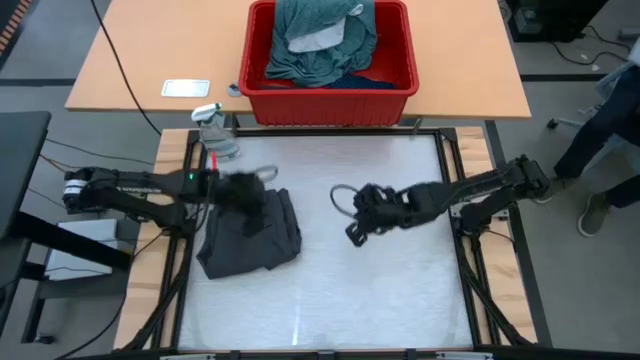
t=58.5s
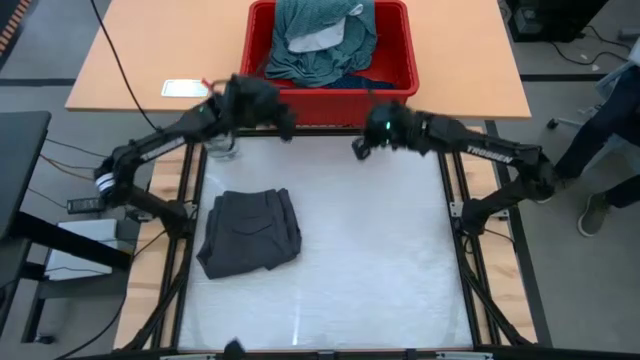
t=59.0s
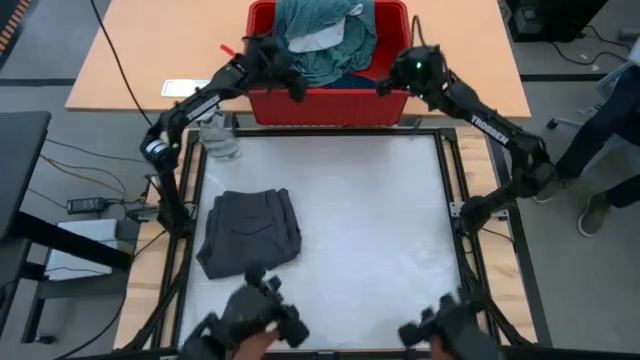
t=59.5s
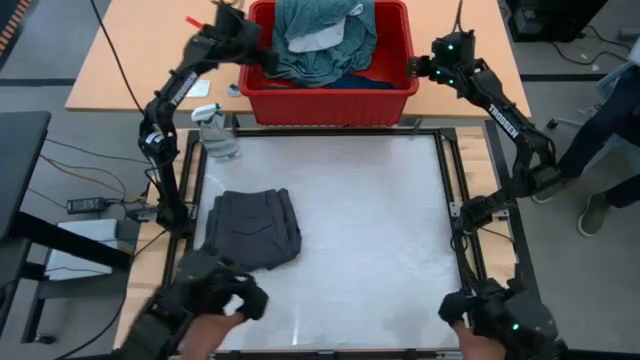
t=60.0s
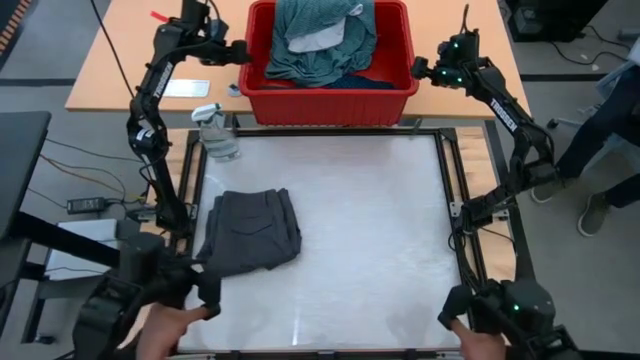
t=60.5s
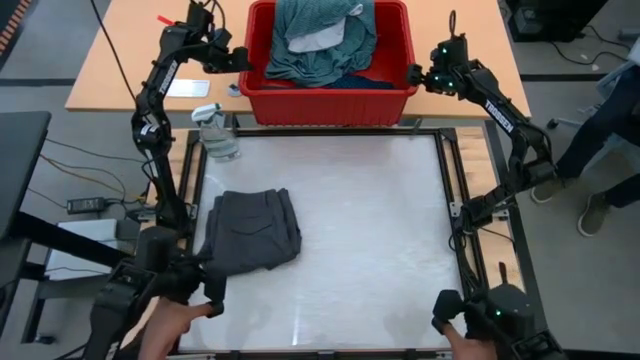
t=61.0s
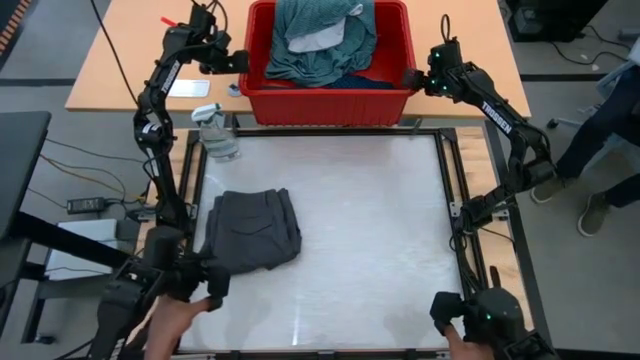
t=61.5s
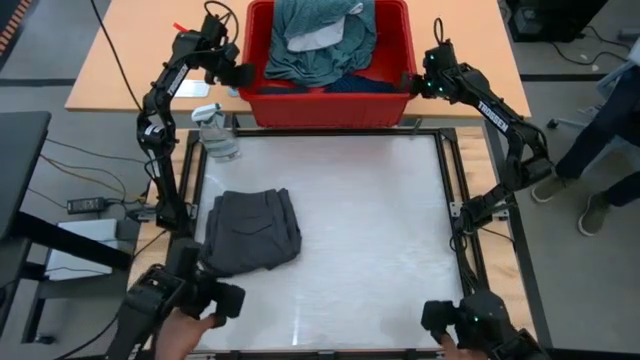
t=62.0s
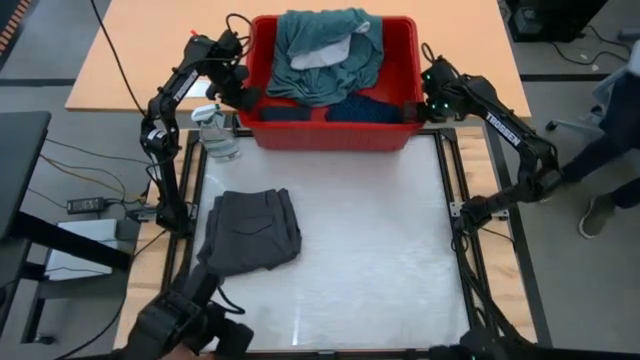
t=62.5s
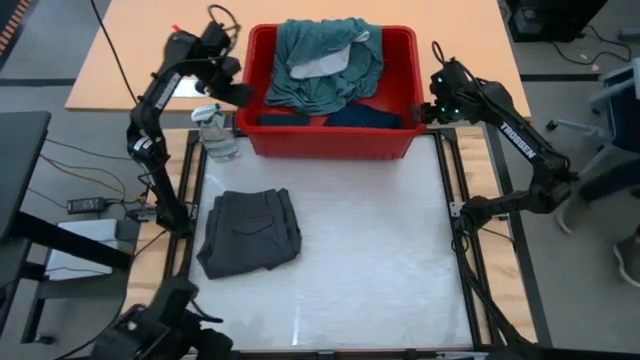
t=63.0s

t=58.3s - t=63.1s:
Task: Fold Laundry from Bin
Adjust the red organizer bin on the table

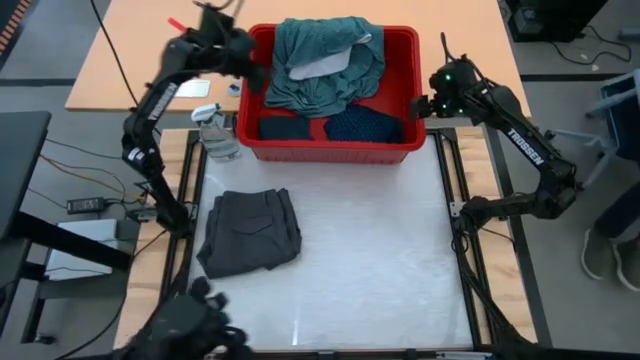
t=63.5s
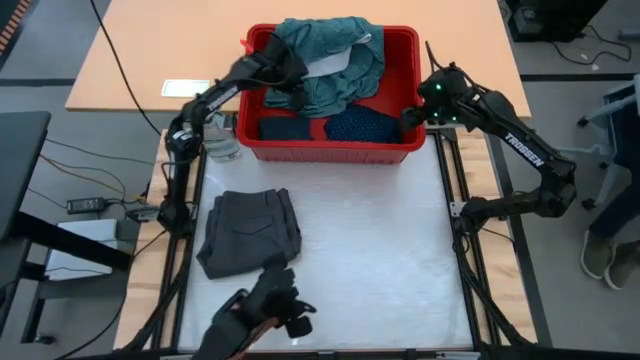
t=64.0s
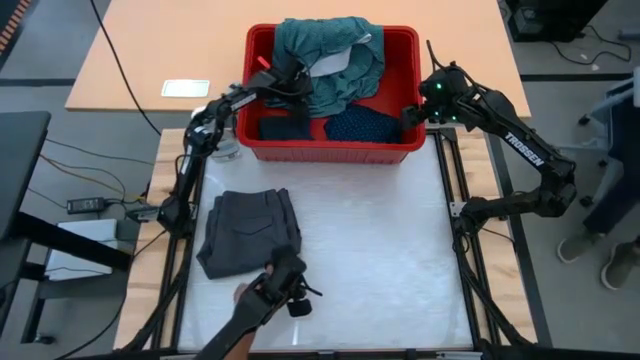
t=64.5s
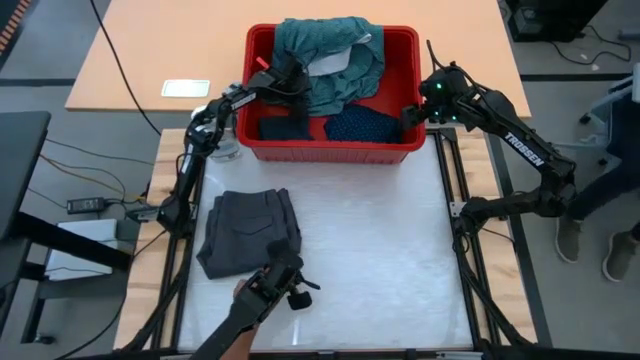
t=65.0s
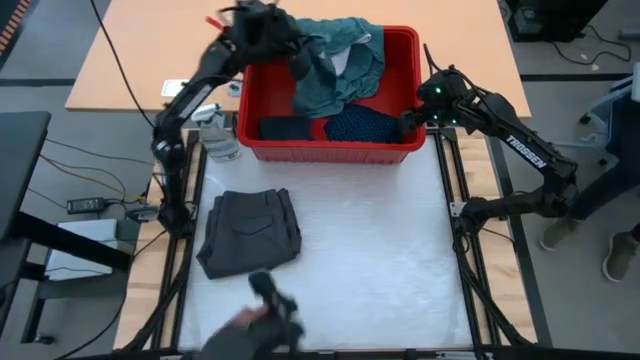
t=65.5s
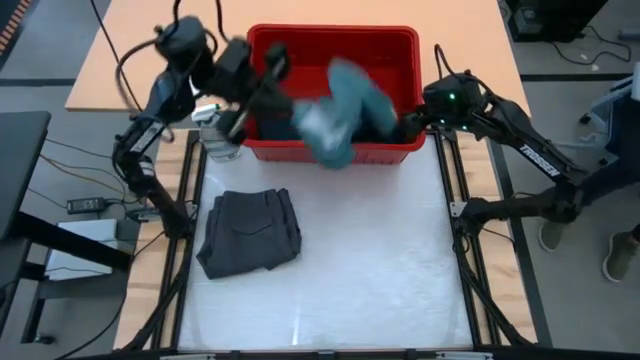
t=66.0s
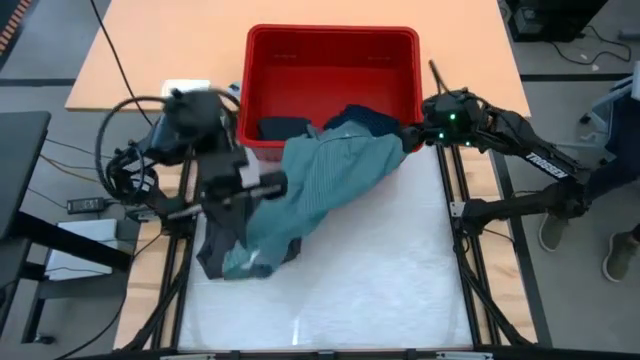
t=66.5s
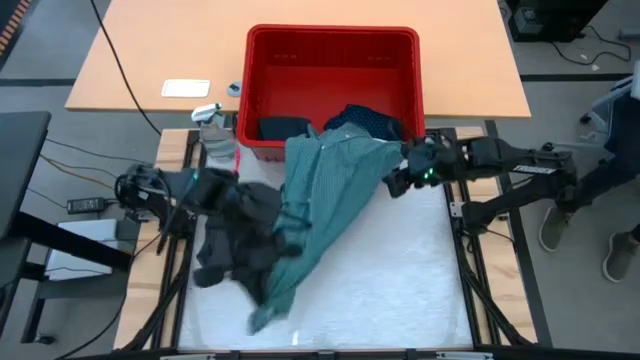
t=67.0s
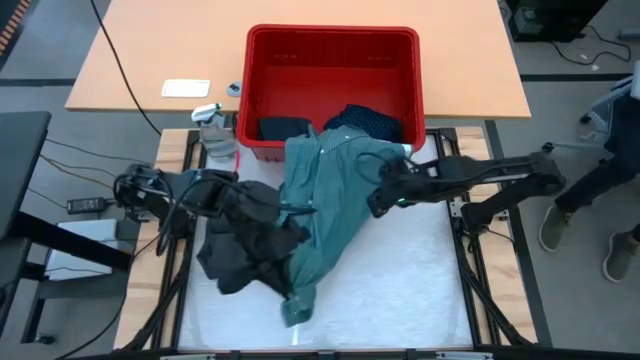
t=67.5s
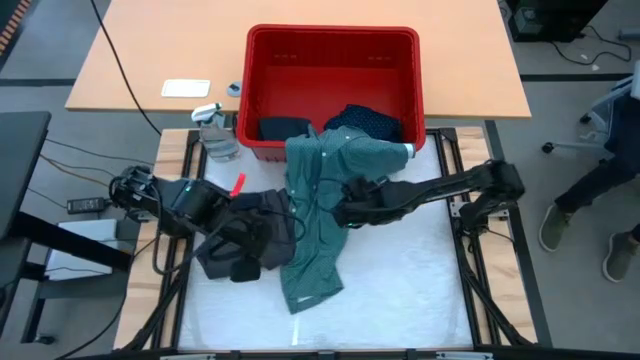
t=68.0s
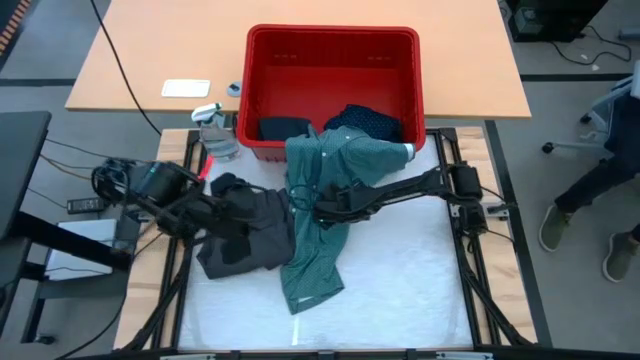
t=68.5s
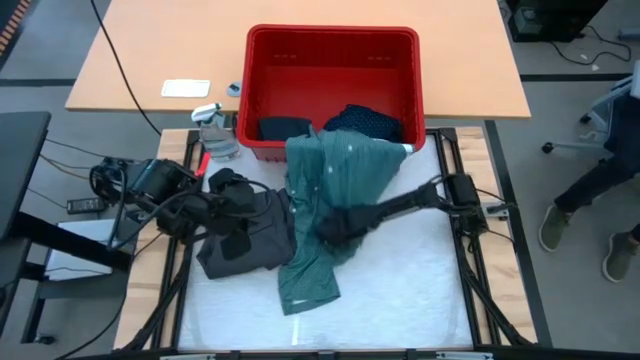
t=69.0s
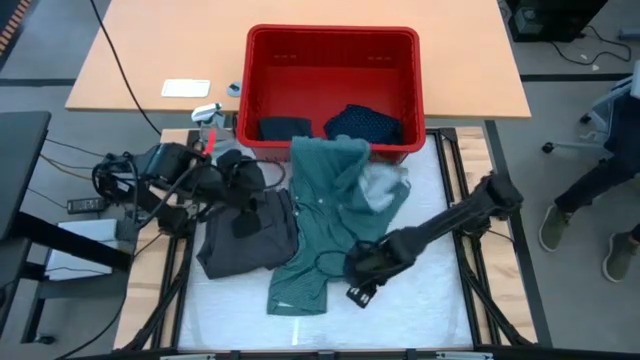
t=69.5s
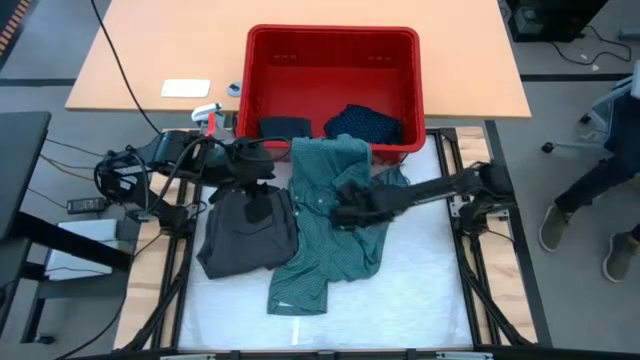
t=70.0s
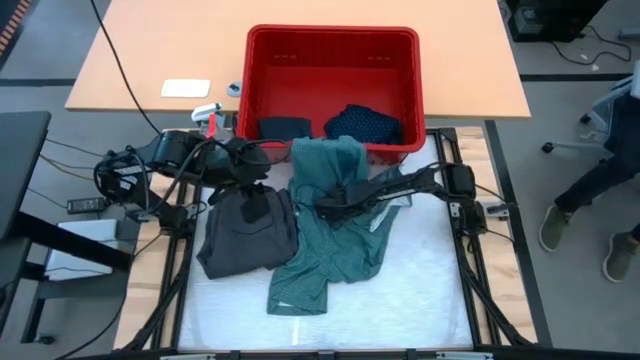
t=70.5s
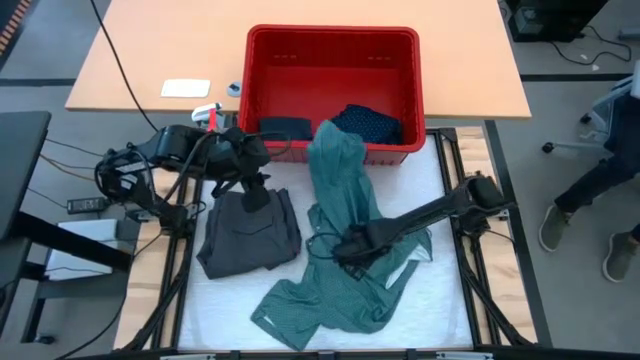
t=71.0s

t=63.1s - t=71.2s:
Put the green polo shirt on the table

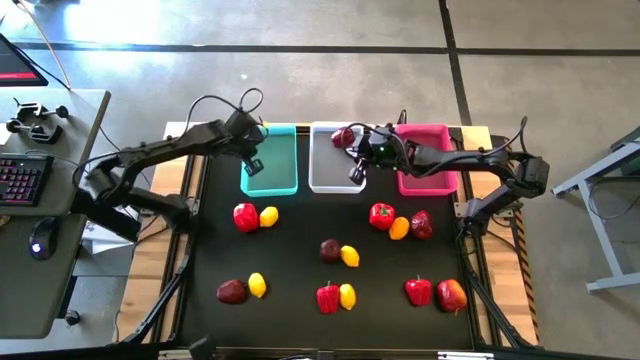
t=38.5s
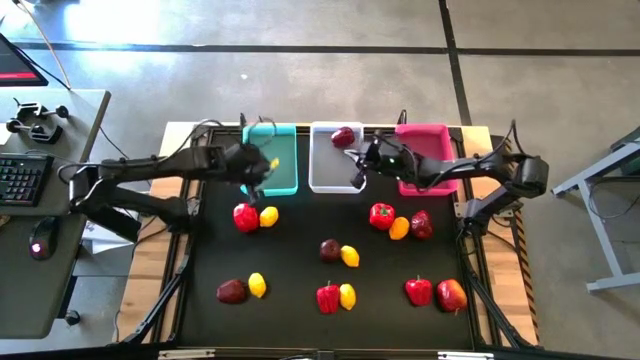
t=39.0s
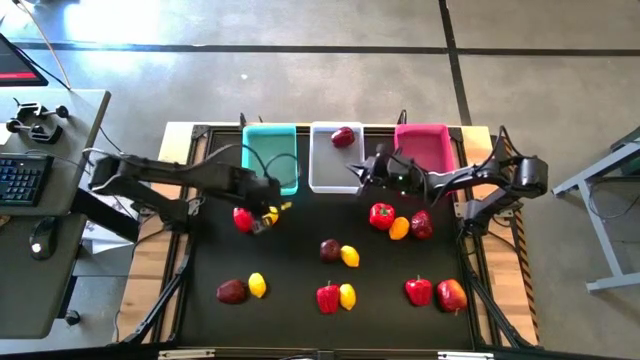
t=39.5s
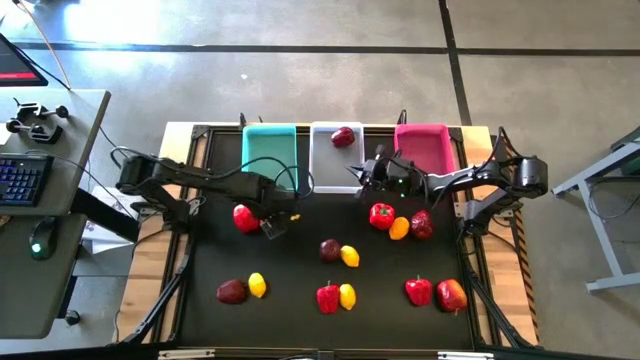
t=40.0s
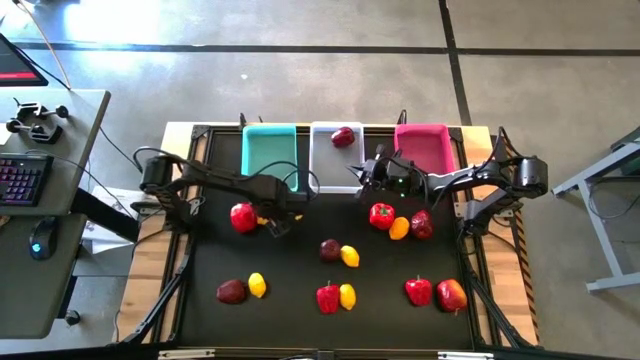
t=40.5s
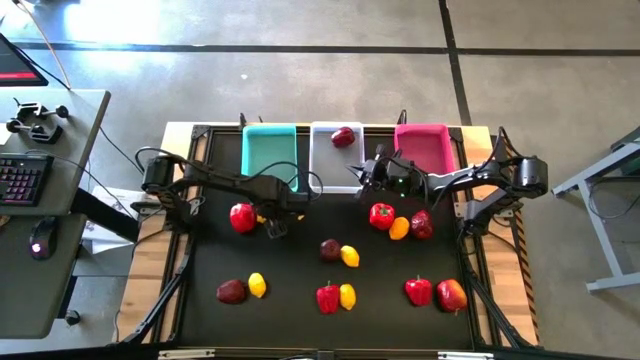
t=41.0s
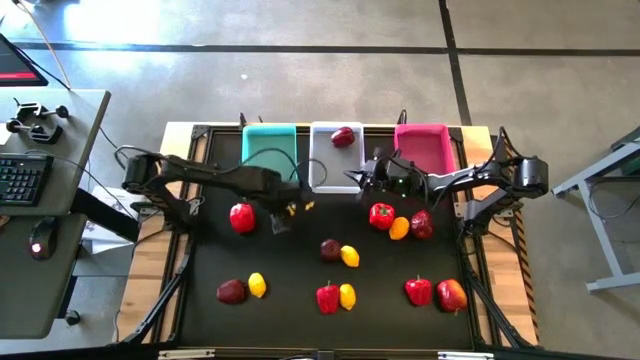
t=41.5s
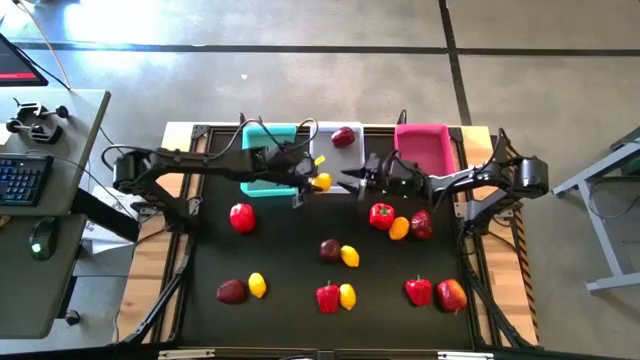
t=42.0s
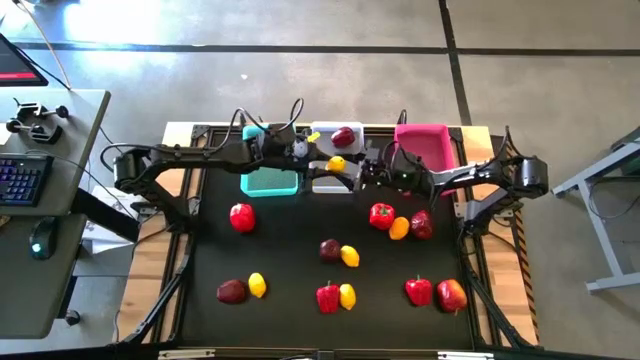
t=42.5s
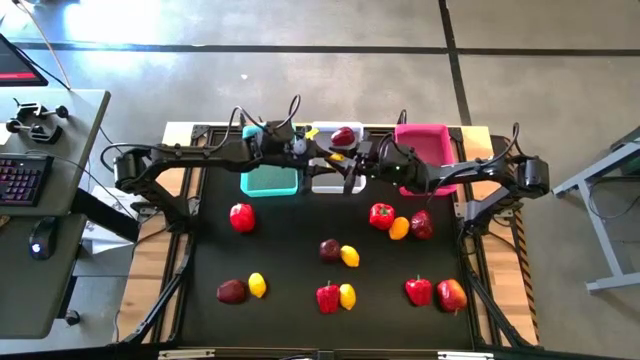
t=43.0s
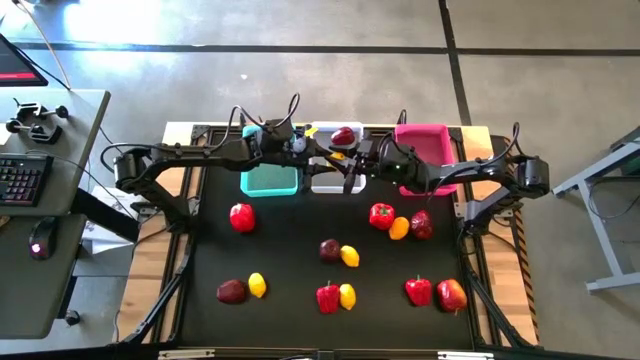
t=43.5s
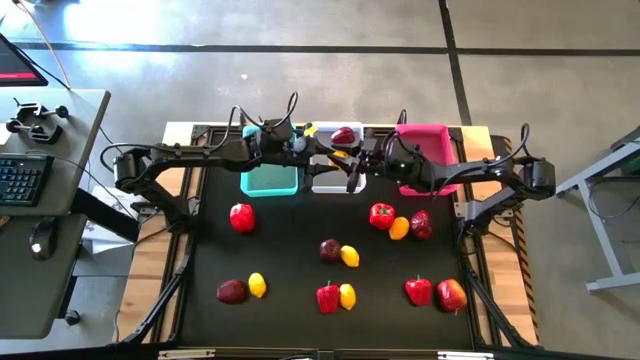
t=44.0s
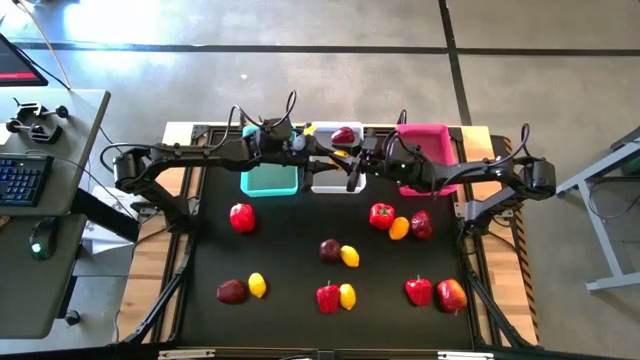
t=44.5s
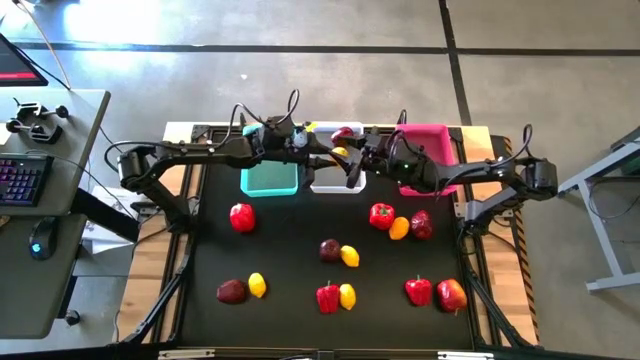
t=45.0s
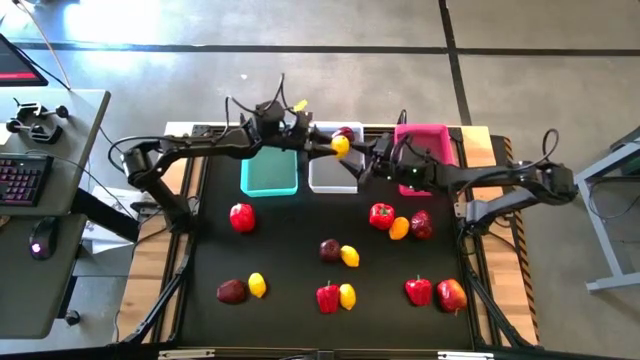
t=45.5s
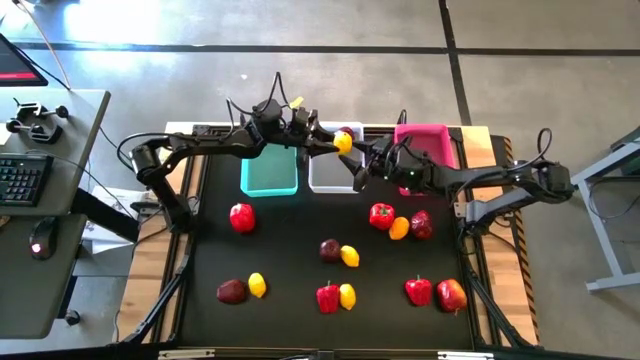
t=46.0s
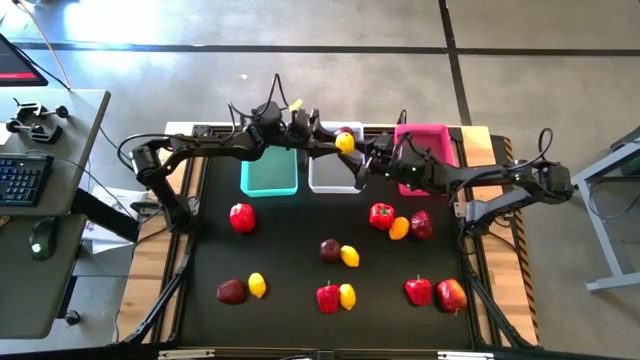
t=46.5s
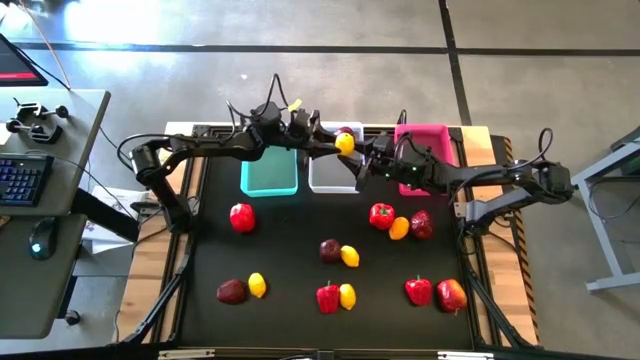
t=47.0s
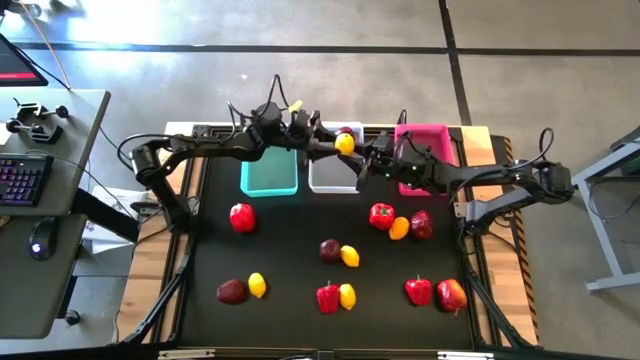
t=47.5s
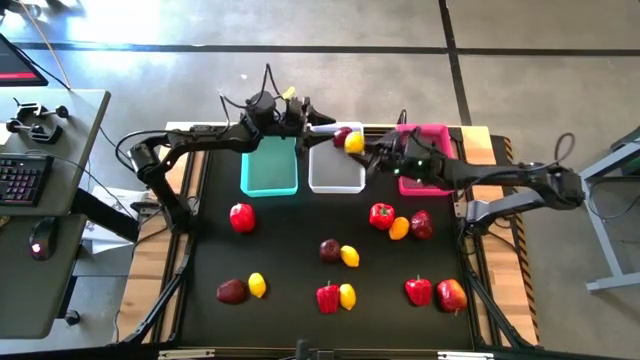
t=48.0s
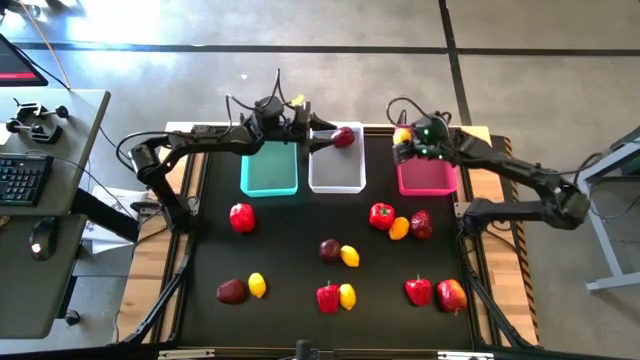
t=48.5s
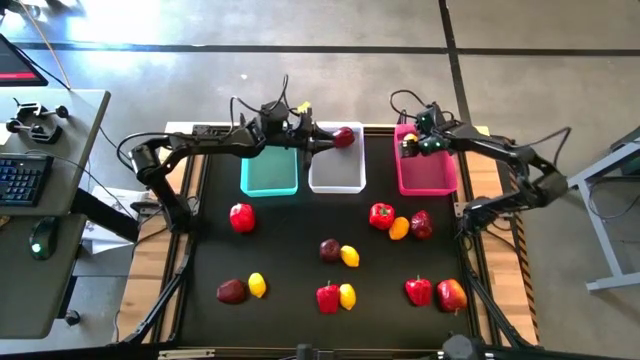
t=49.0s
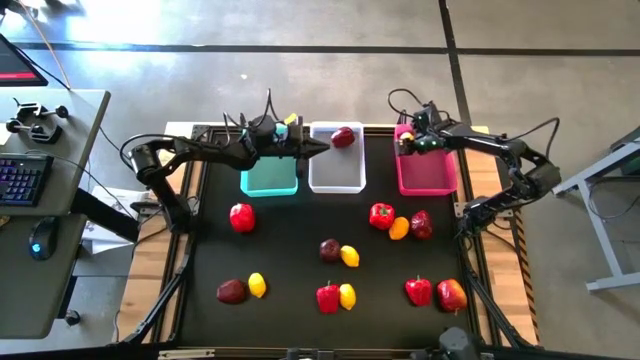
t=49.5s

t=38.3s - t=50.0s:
Task: Sort produce into baskets
Put the lemon into the pink bin
